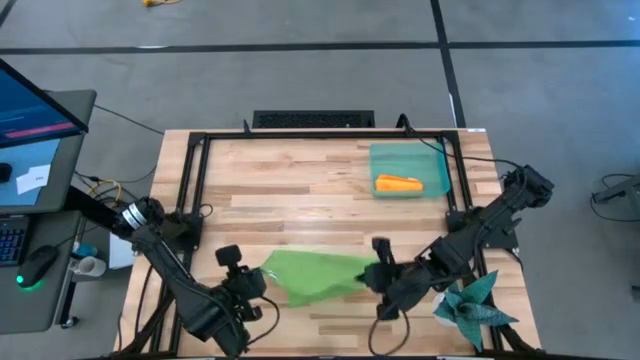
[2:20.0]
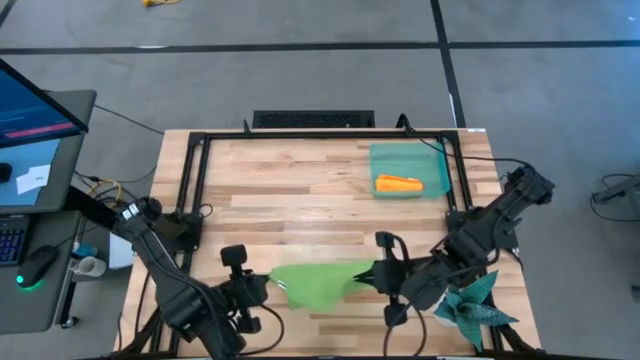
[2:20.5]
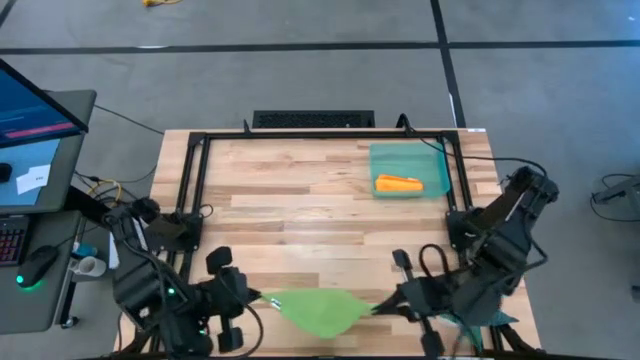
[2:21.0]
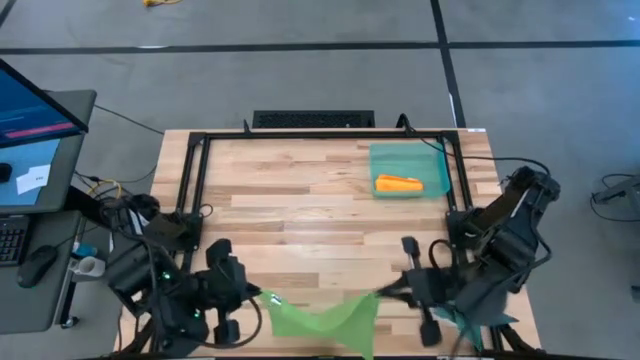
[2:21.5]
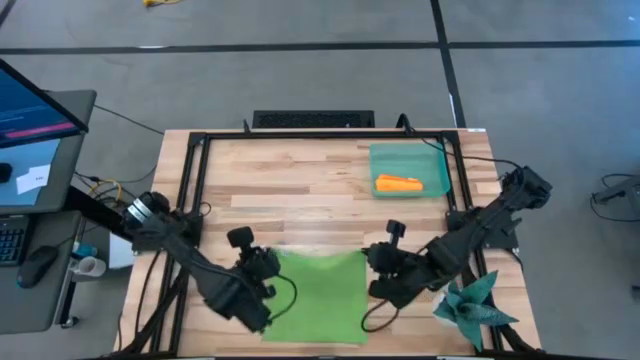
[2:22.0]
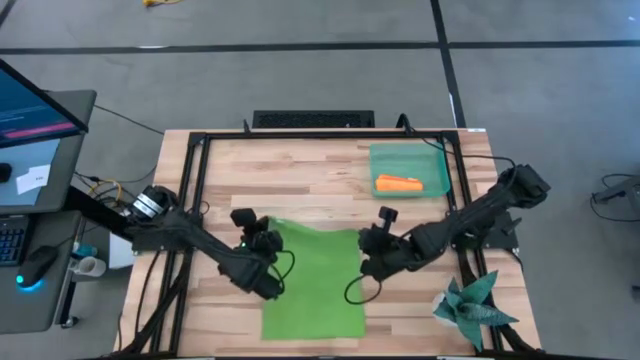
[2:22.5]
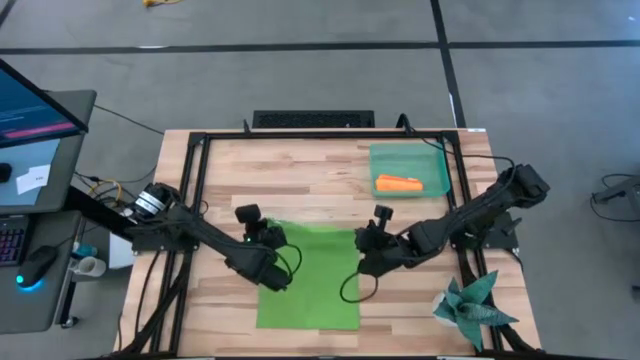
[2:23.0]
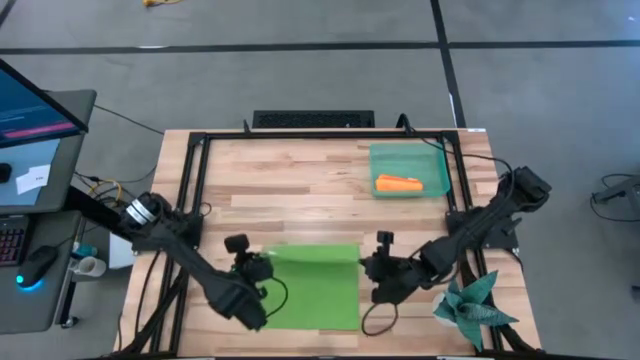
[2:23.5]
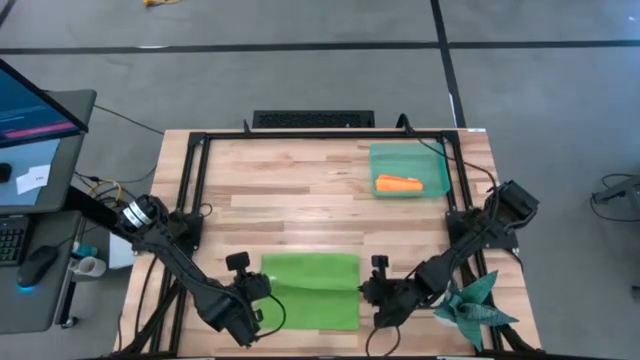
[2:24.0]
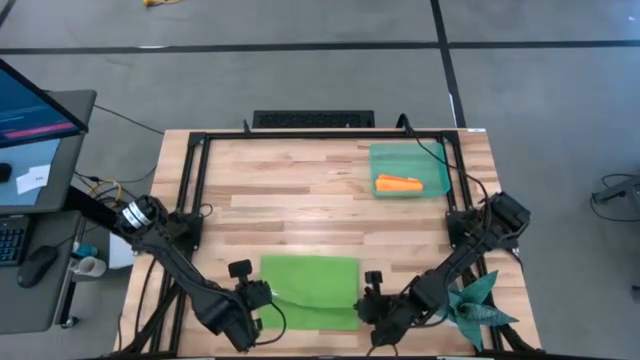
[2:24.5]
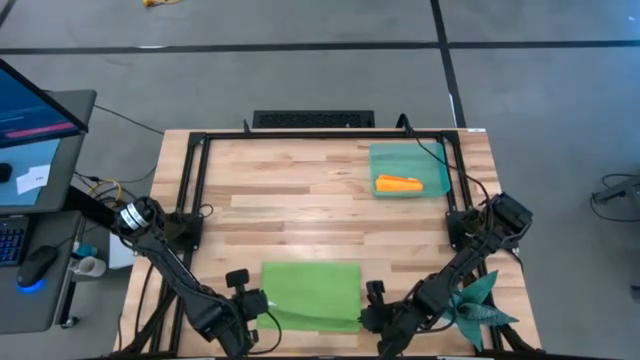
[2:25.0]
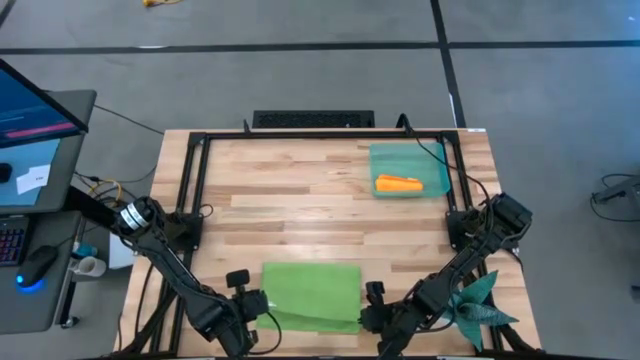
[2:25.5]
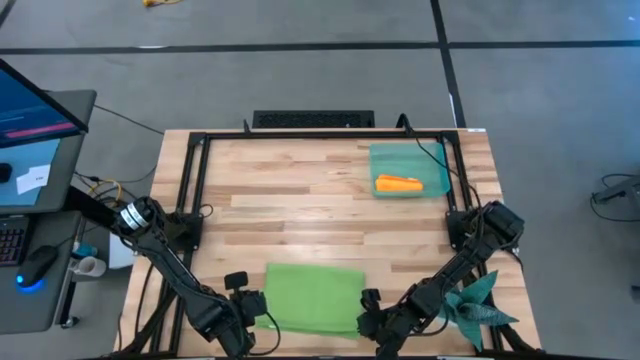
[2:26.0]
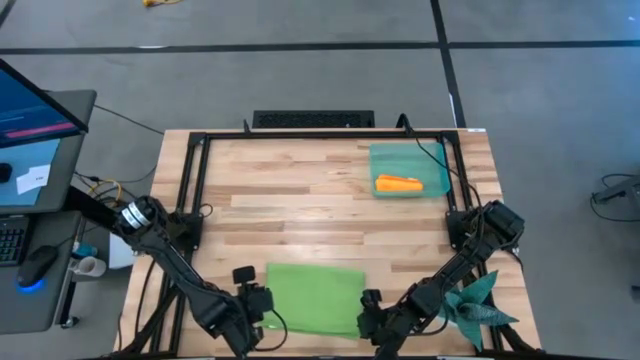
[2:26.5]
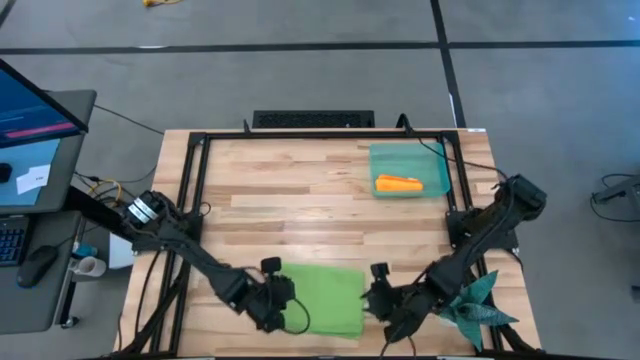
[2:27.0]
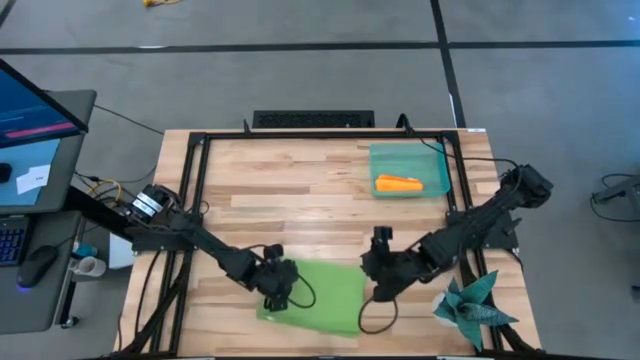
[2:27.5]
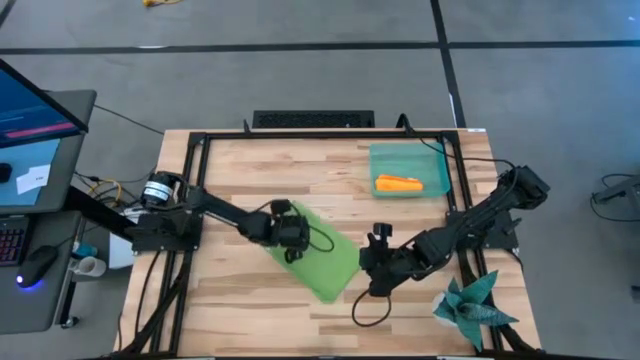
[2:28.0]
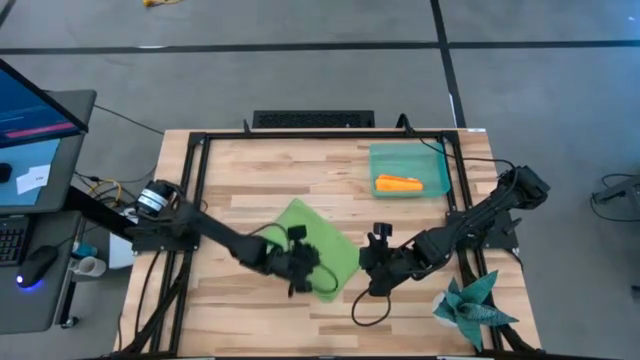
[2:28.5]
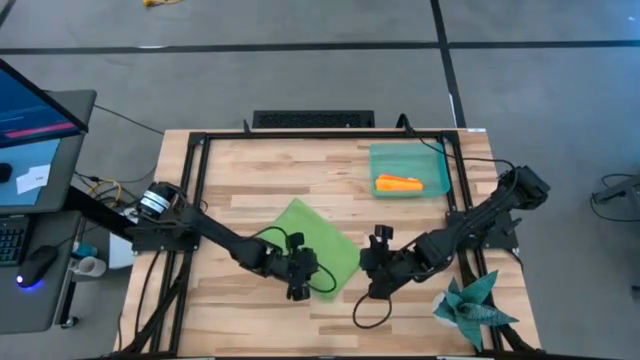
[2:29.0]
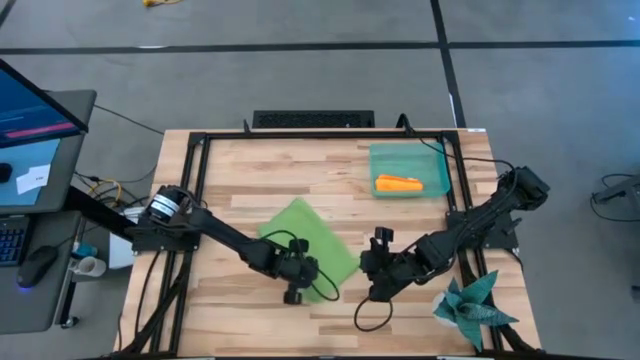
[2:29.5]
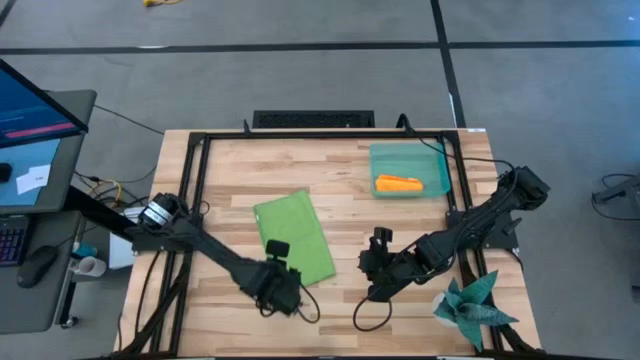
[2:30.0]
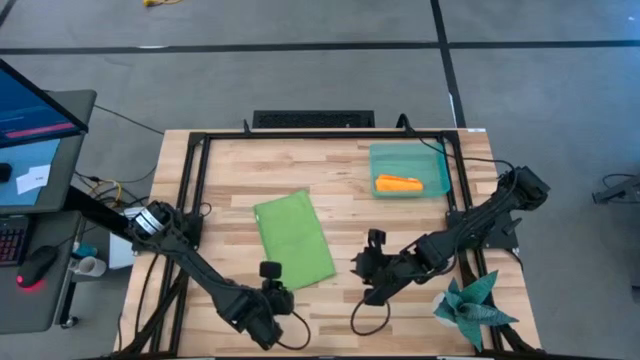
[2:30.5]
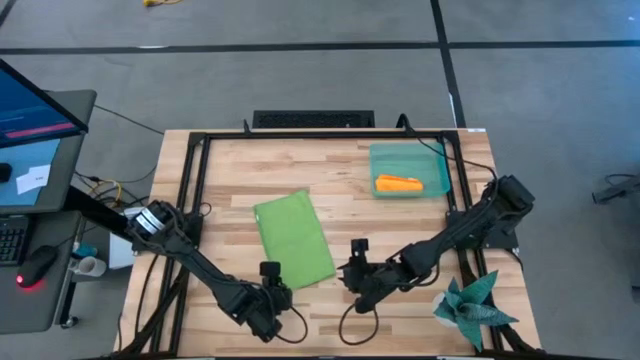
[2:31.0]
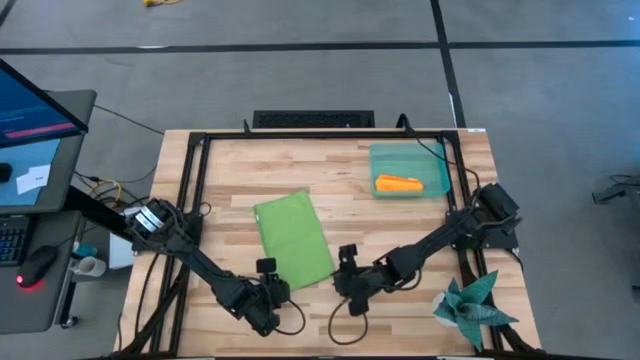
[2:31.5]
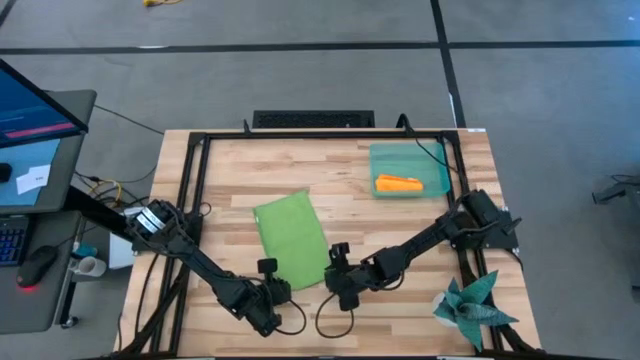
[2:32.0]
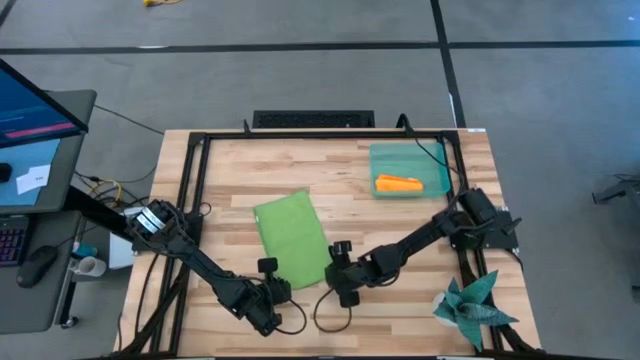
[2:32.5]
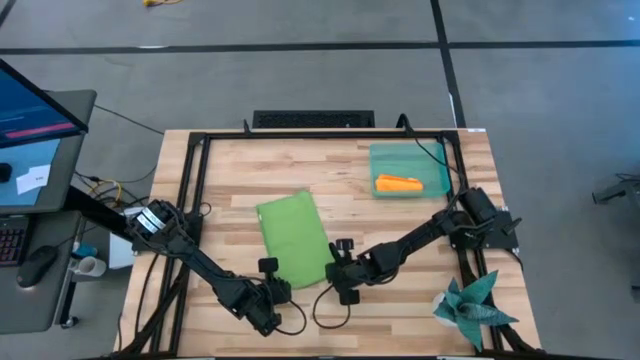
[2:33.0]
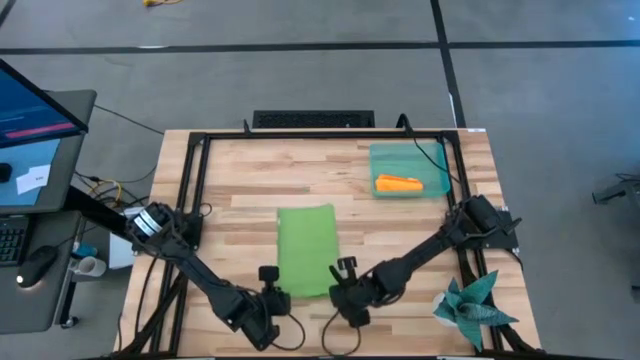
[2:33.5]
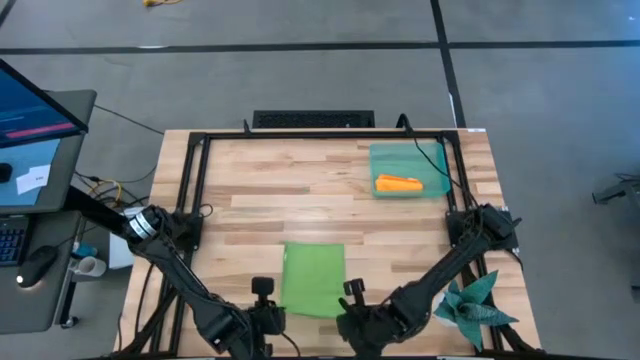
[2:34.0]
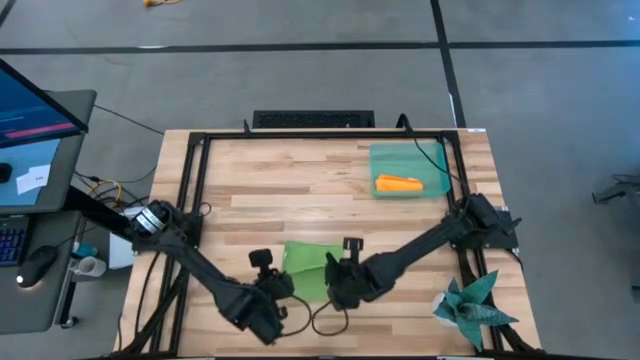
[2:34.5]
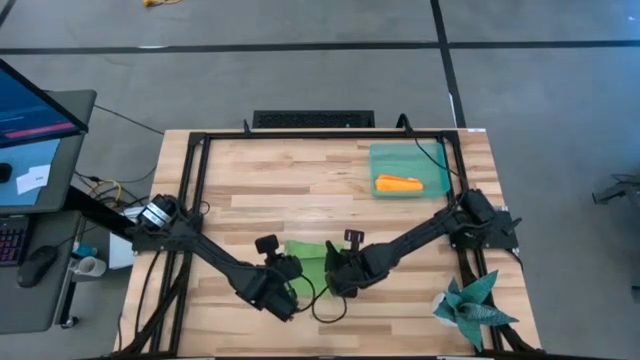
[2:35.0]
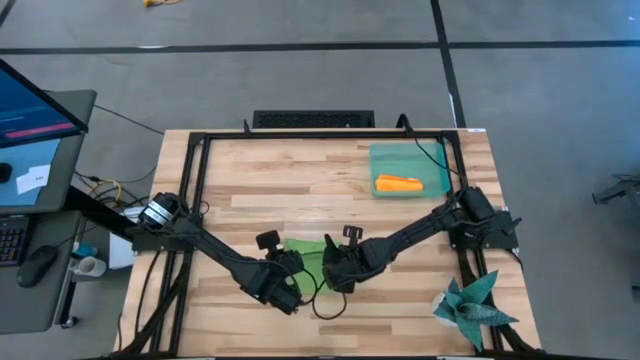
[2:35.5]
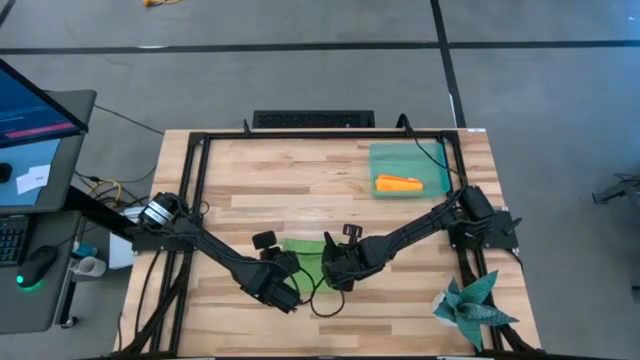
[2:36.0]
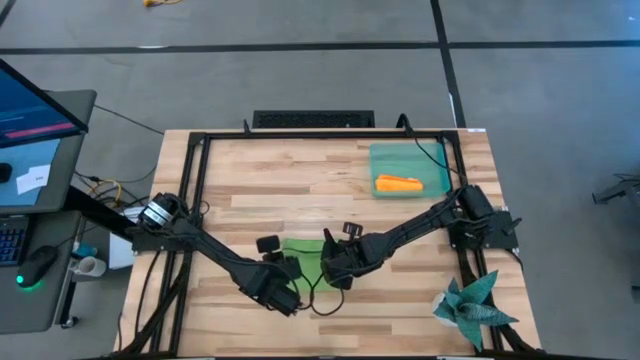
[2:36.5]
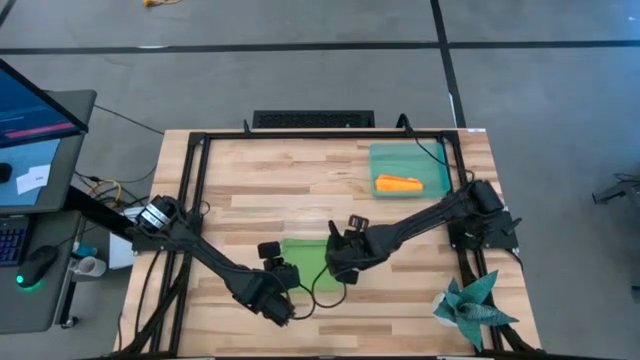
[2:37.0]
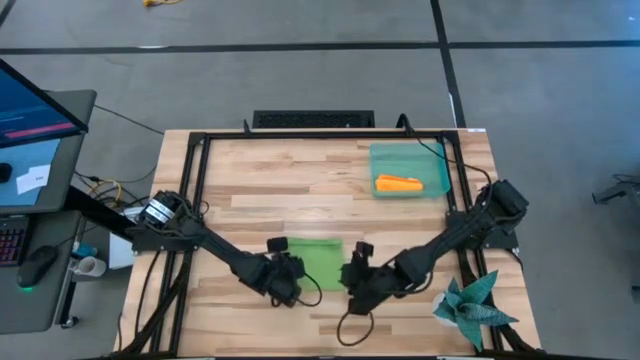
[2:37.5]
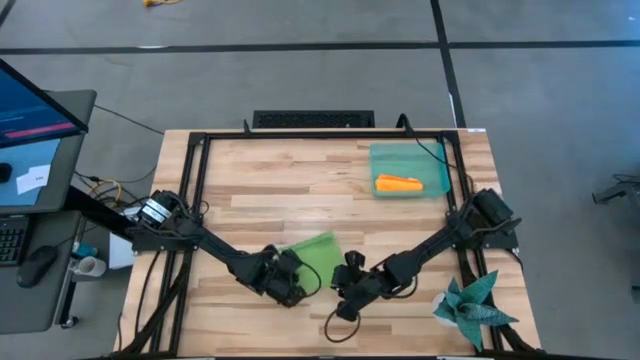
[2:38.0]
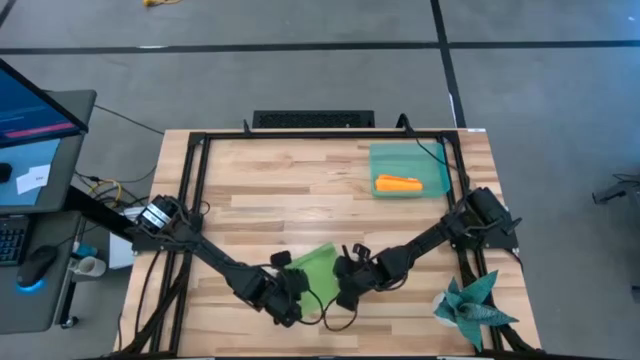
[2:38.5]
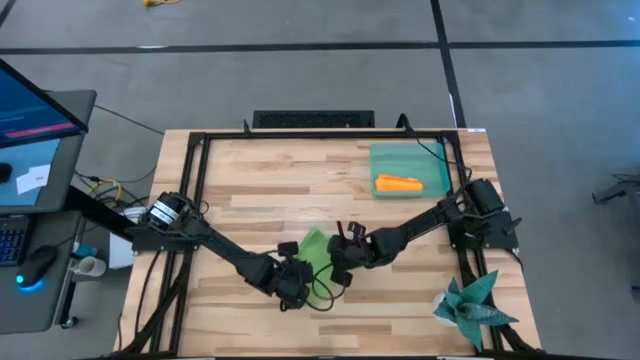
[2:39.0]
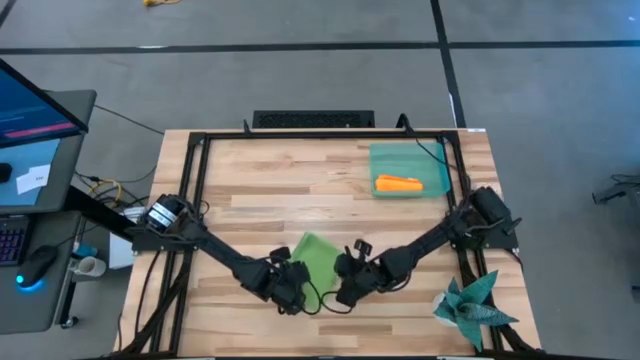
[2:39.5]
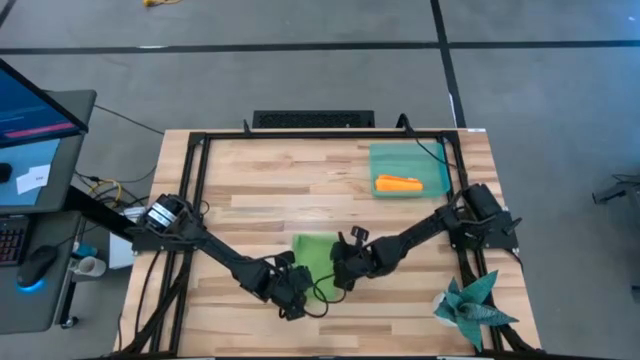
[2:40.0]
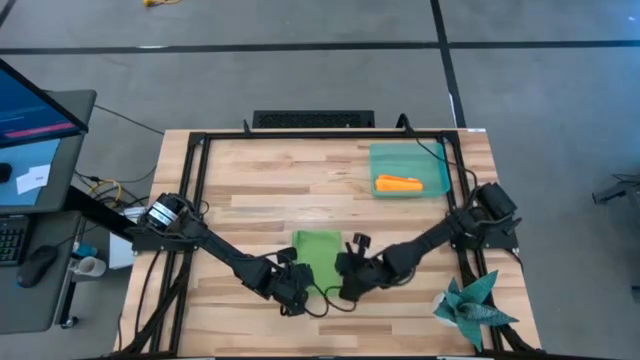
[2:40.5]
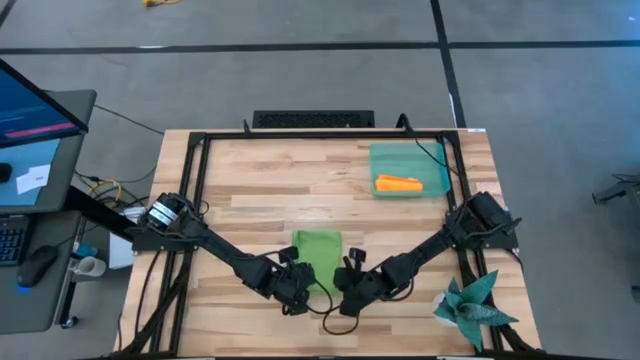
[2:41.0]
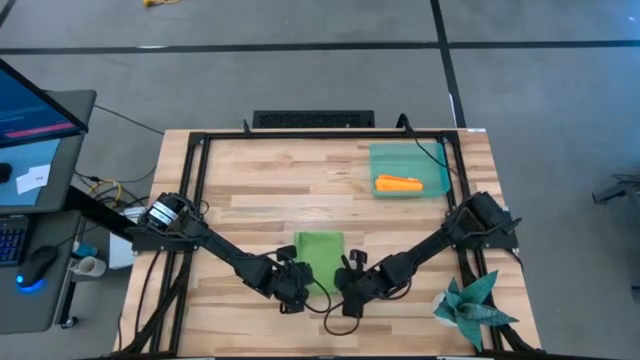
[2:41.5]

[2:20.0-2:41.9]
Task: Roll microfiber towels into tight, uniform cylinder then place into a basket
Fold the green towel
